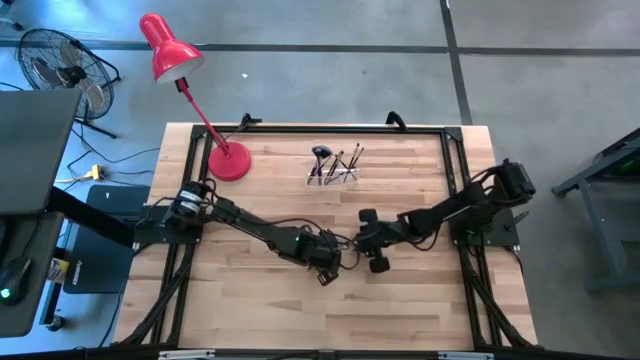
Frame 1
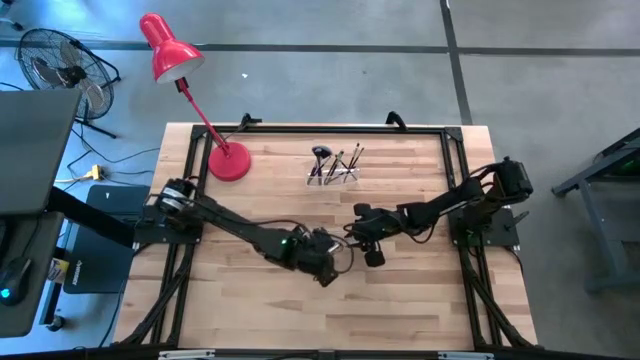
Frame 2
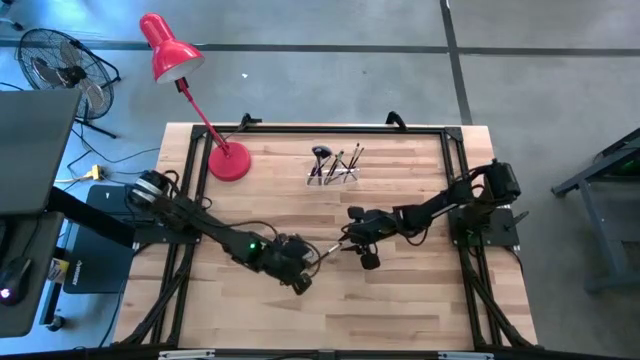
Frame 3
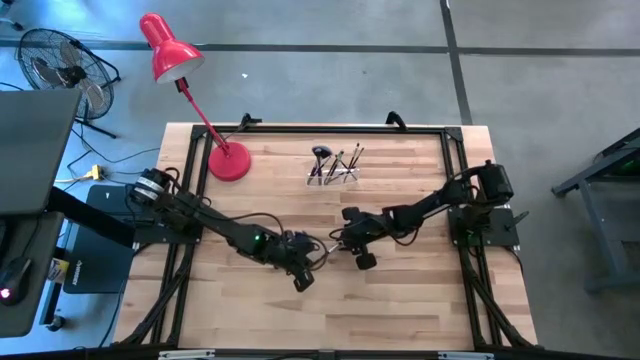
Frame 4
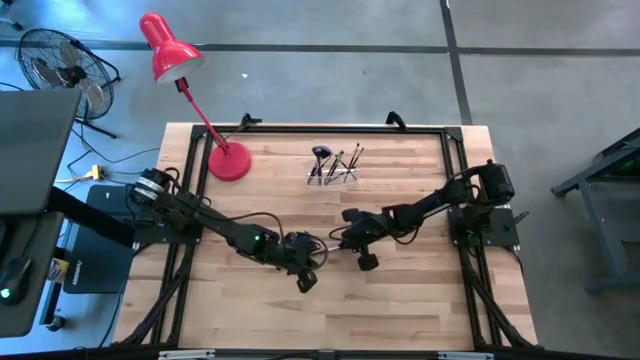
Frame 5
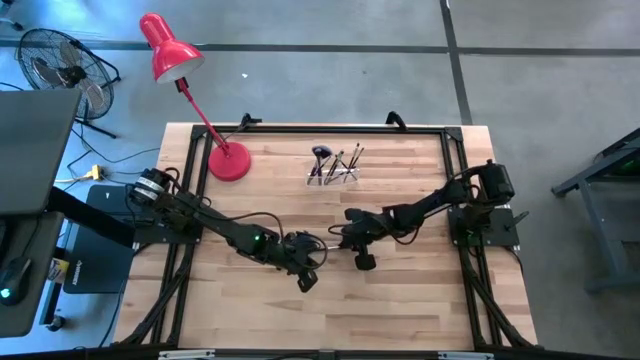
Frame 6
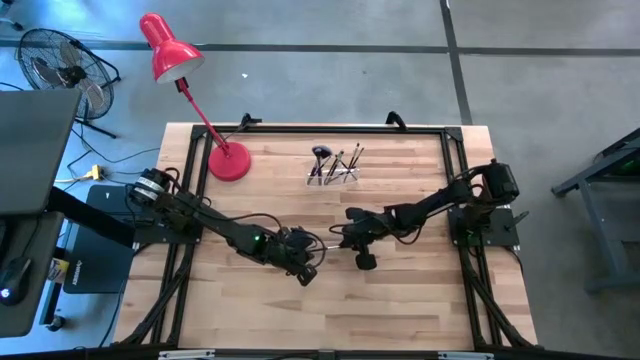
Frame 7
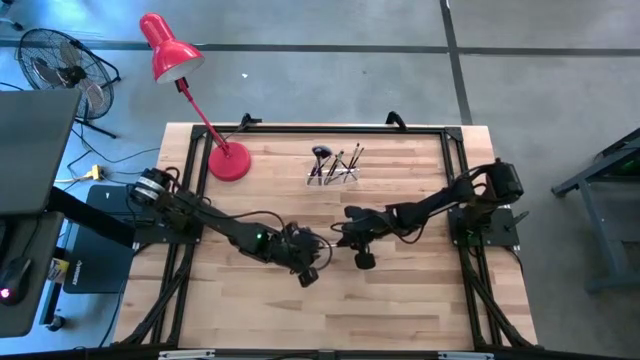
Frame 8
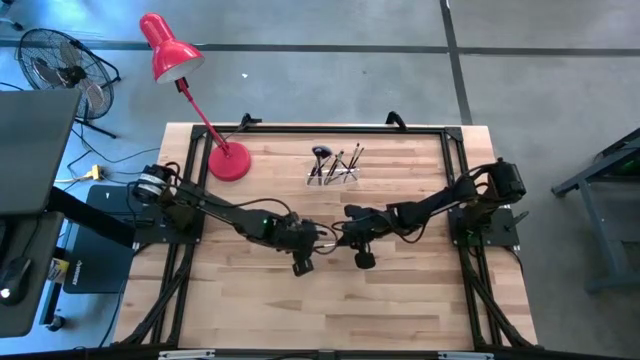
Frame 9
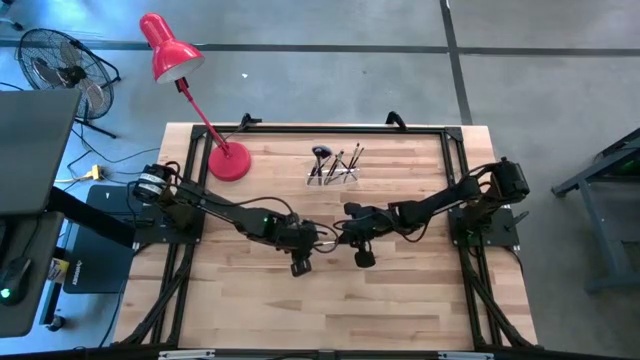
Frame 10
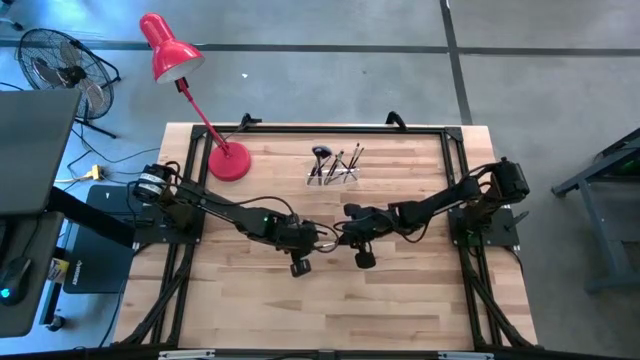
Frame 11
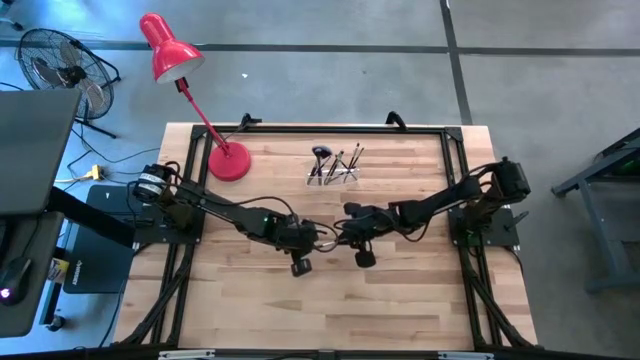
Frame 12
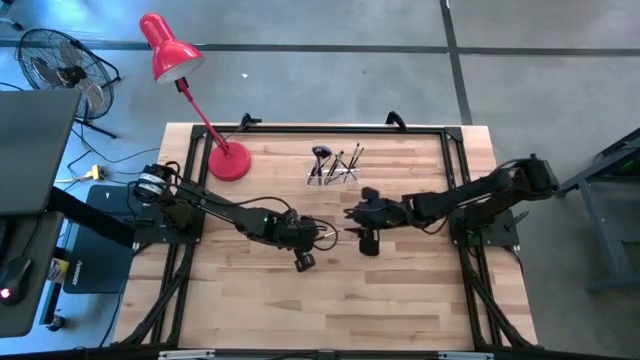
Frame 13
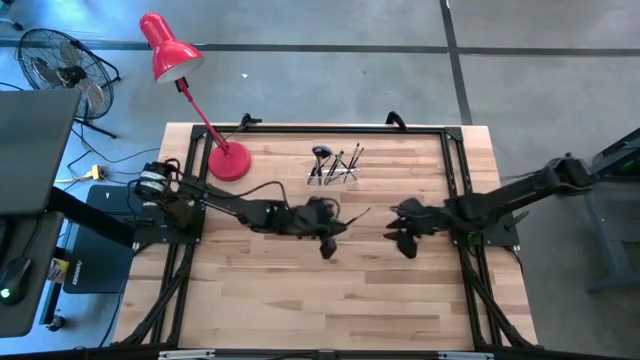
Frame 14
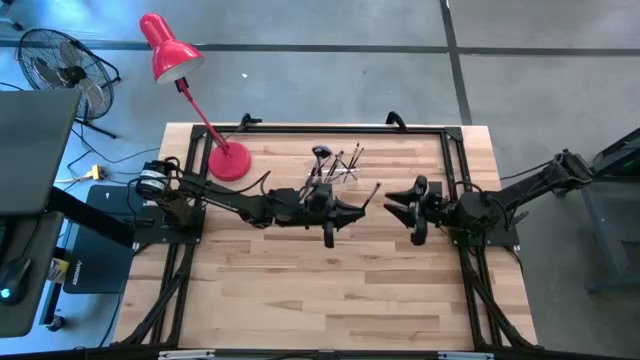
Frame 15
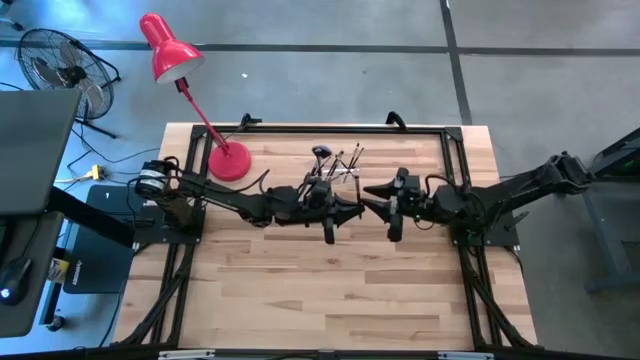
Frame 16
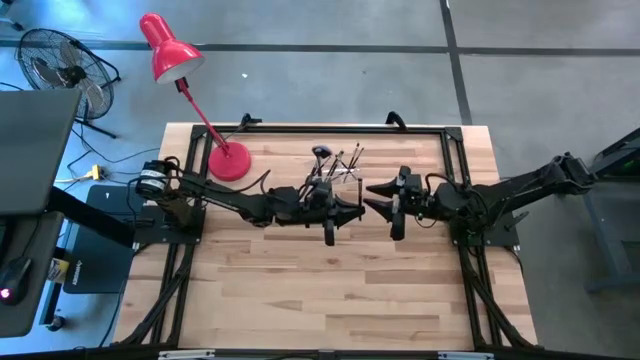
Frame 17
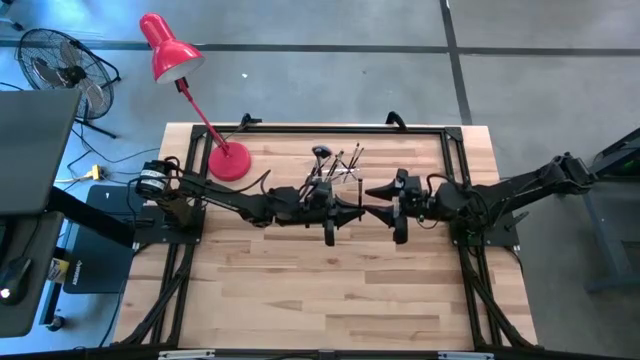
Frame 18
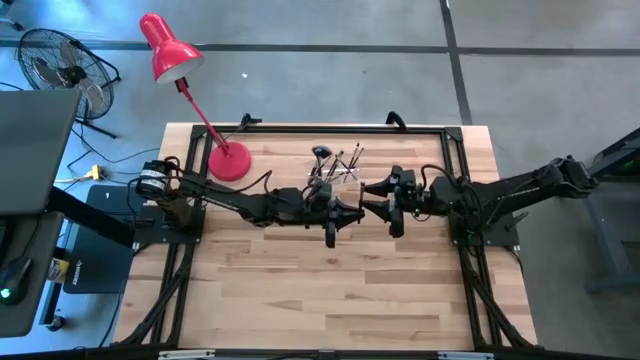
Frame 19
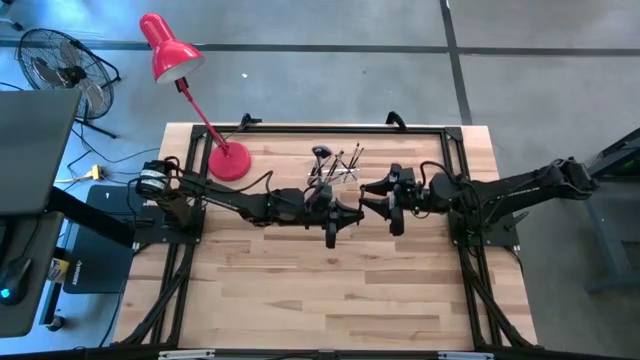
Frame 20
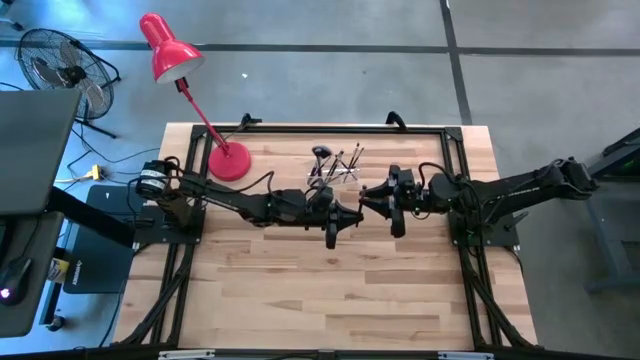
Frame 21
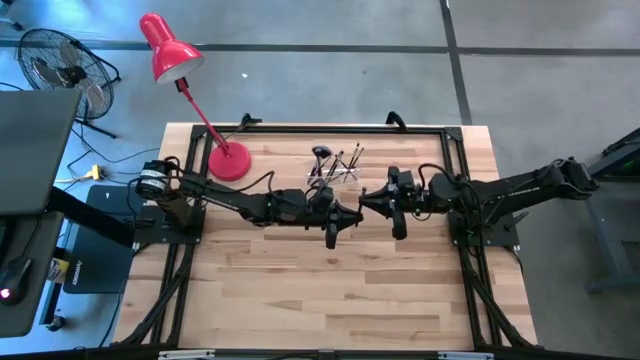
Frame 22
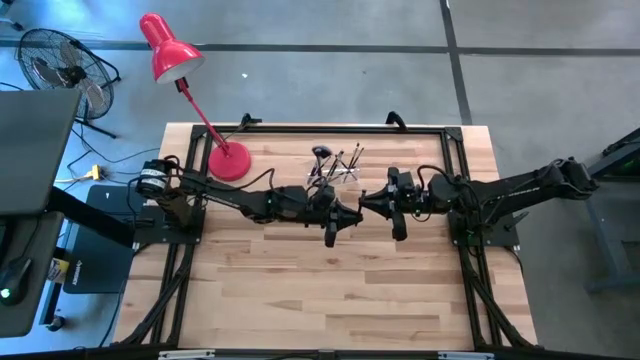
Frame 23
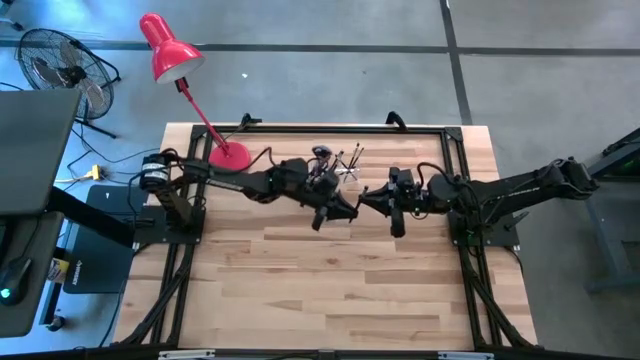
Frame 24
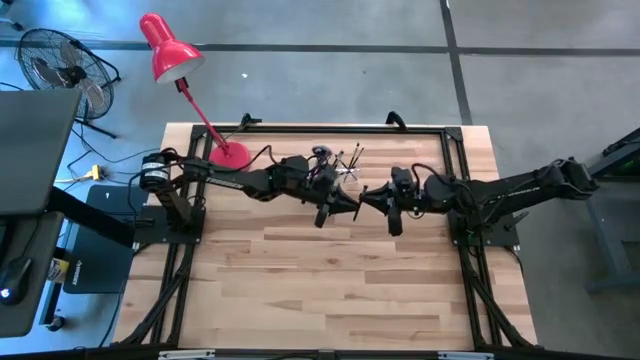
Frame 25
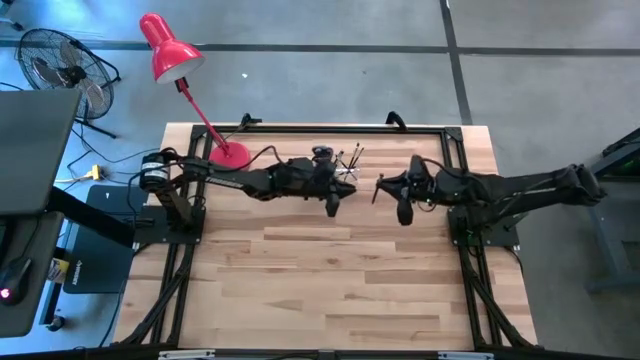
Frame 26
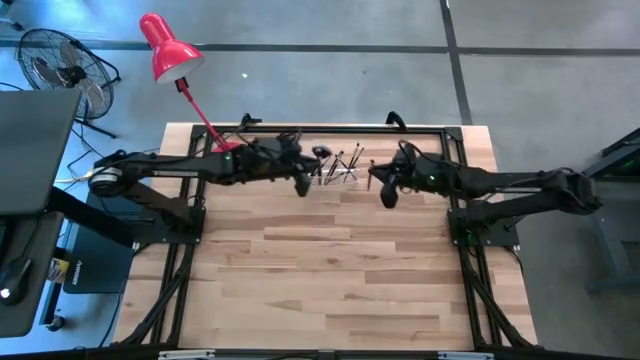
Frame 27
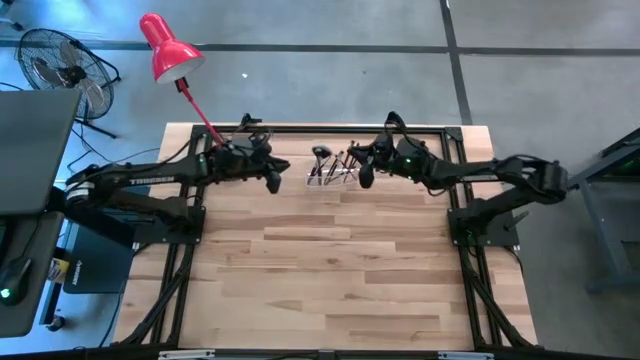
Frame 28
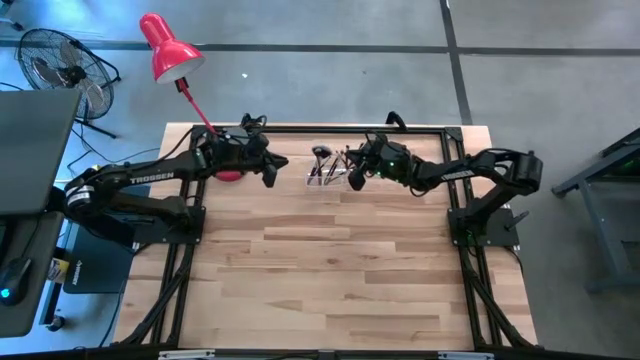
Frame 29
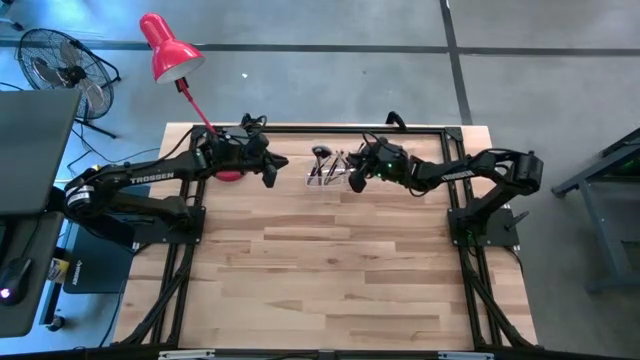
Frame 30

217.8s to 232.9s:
Task: Put items in baskets/containers
Put the foundation brush into the transparent organizer

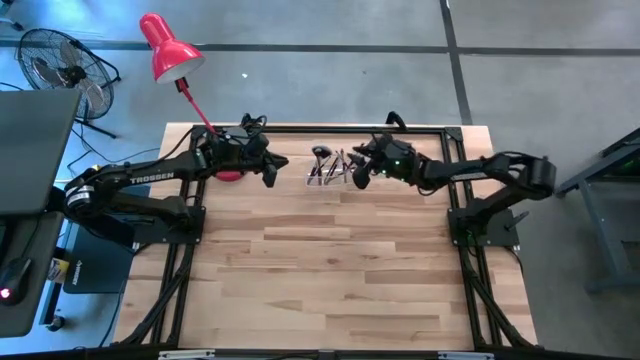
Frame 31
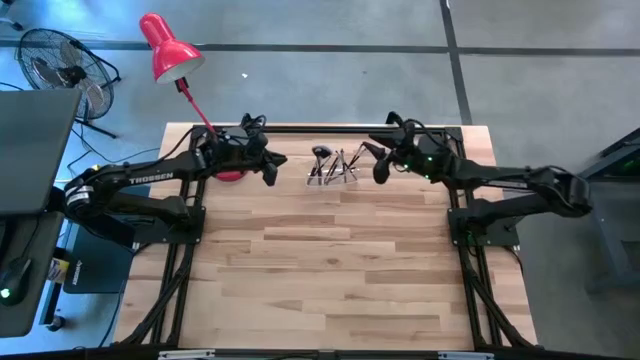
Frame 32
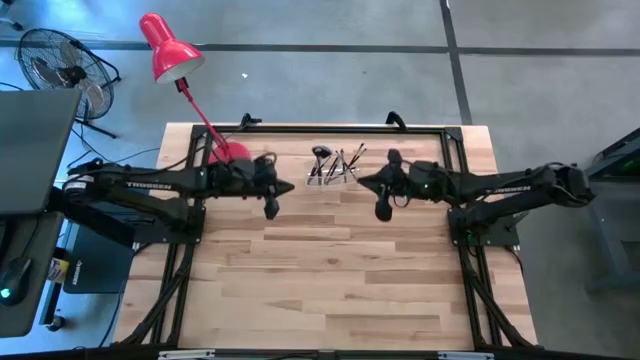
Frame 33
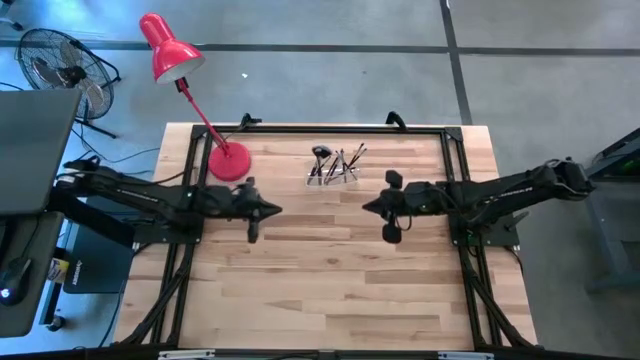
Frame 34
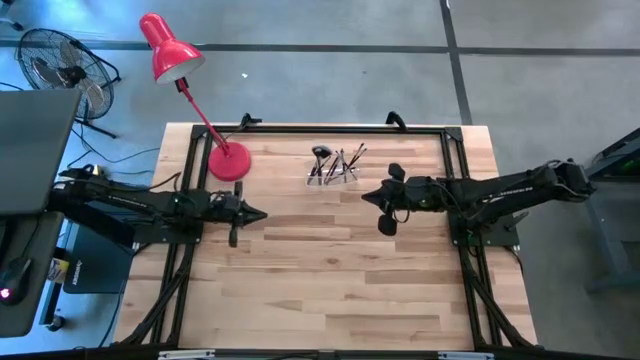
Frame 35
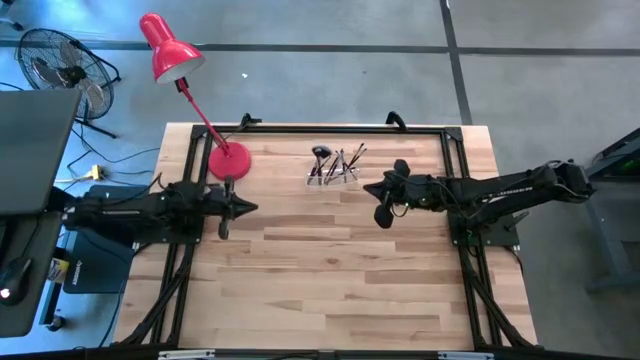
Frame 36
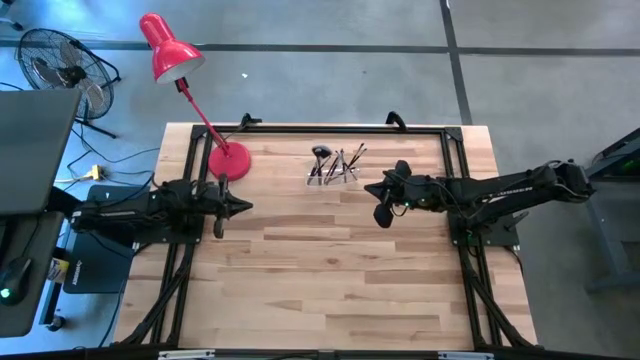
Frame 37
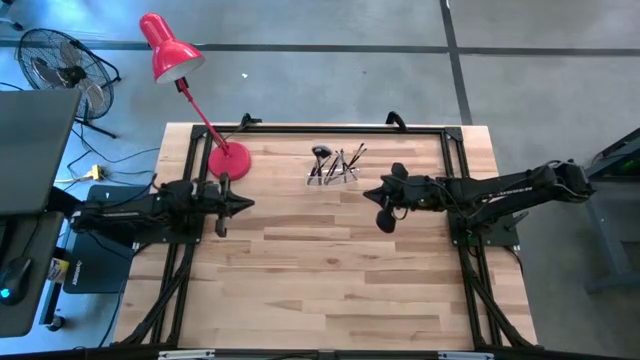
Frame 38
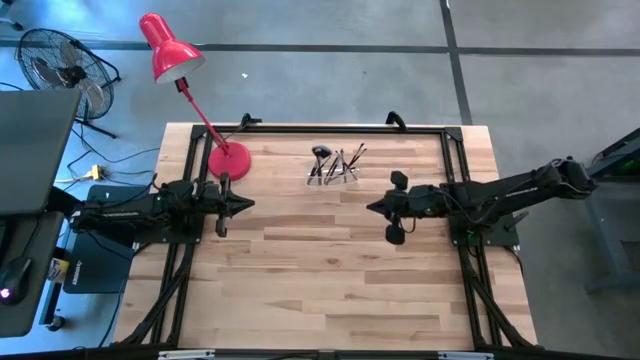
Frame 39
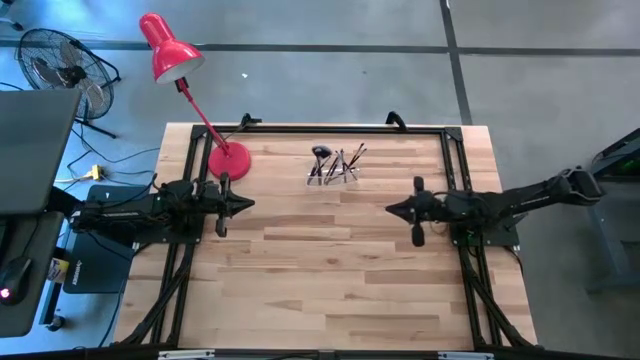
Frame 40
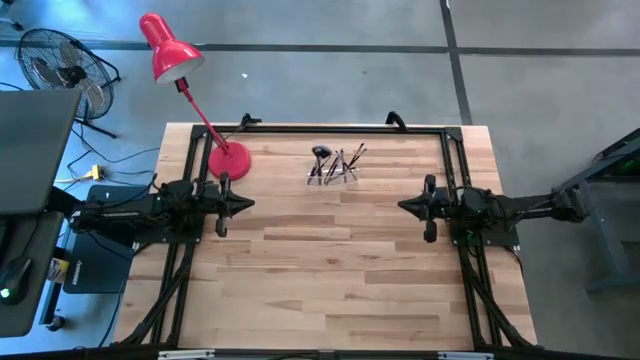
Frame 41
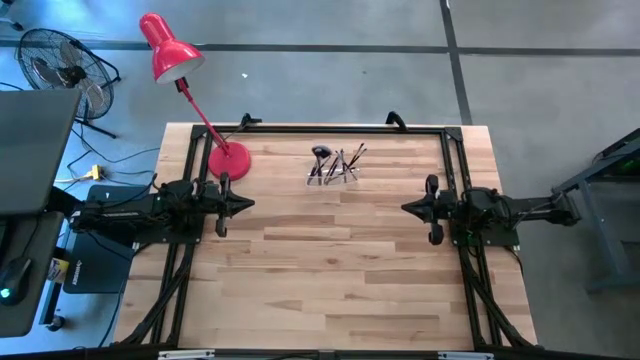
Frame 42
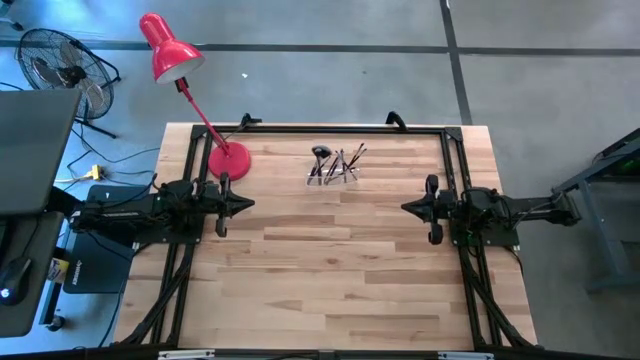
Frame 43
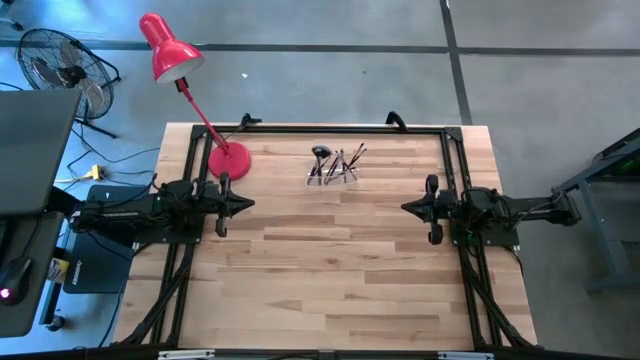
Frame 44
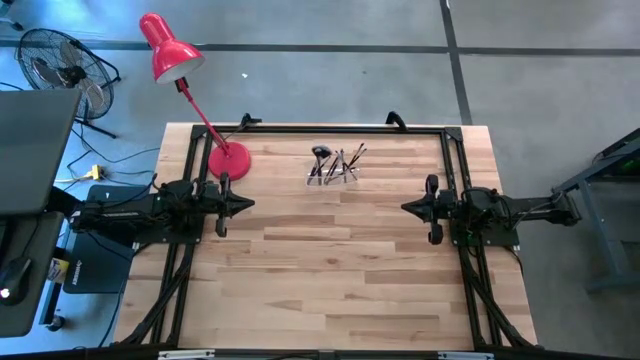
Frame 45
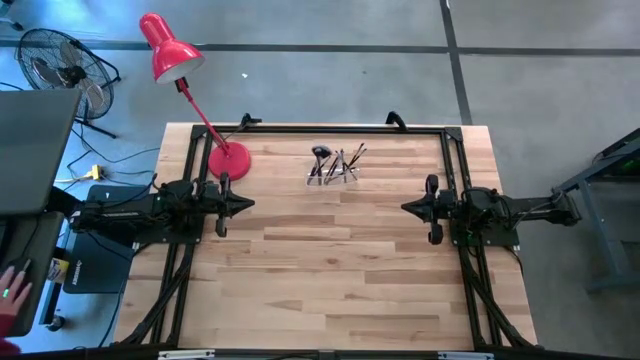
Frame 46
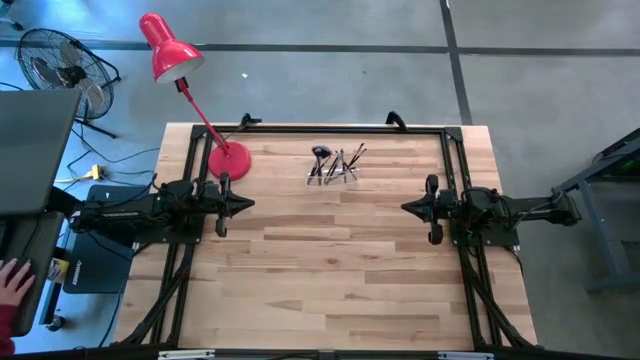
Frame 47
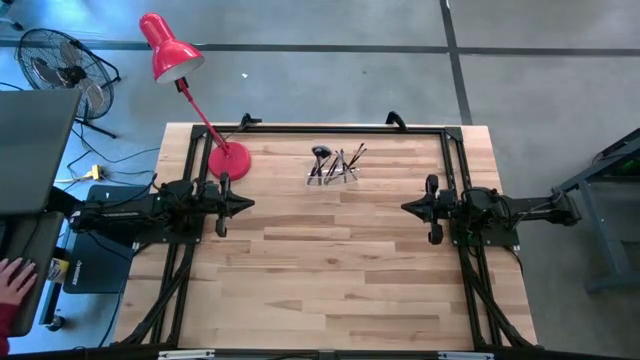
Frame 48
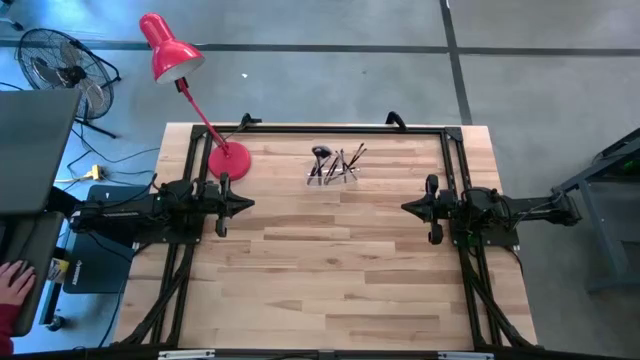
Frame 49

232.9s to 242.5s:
Return to Home Position
